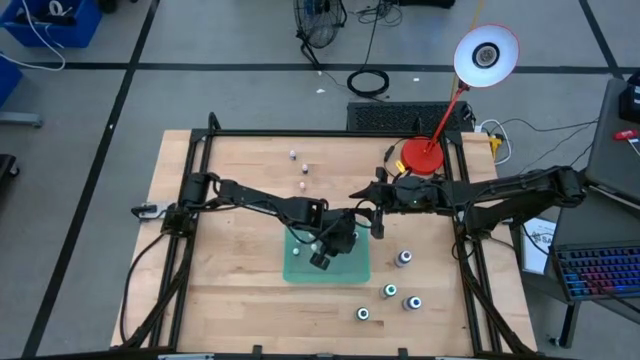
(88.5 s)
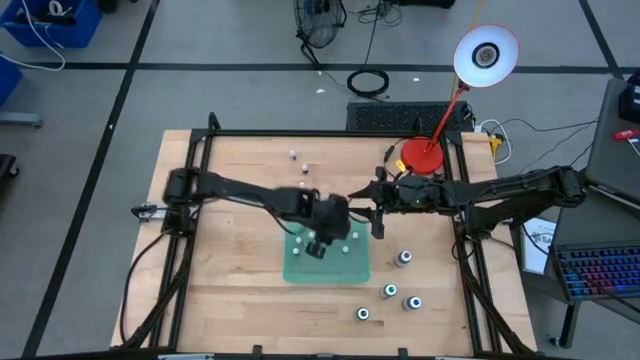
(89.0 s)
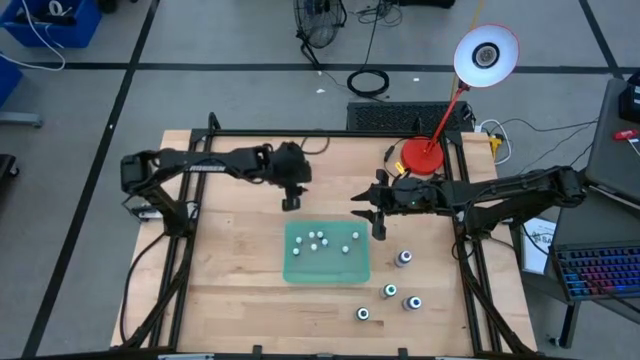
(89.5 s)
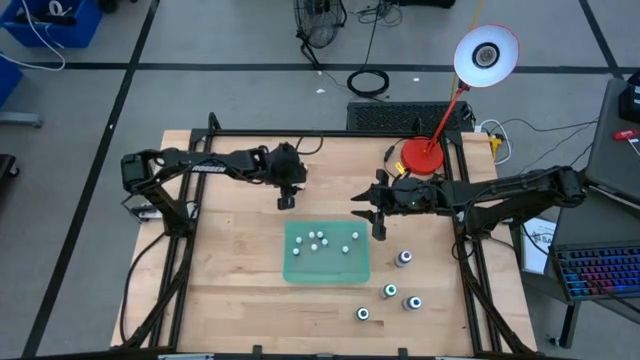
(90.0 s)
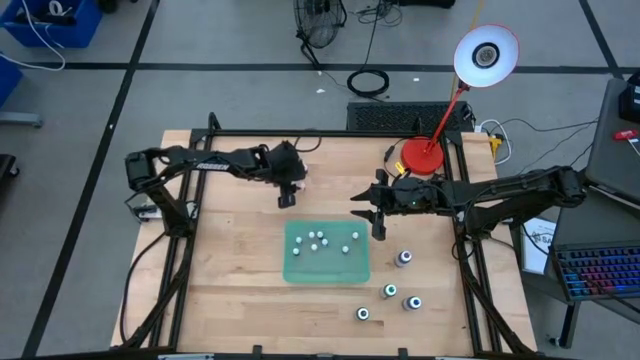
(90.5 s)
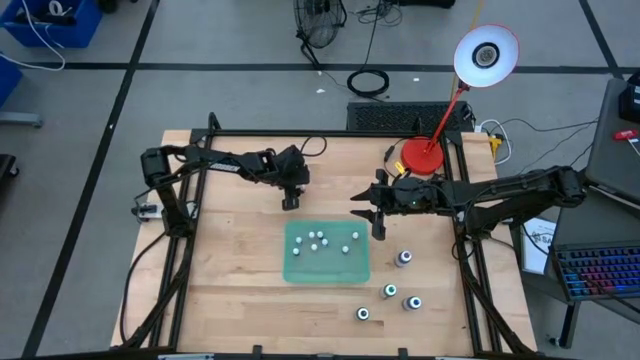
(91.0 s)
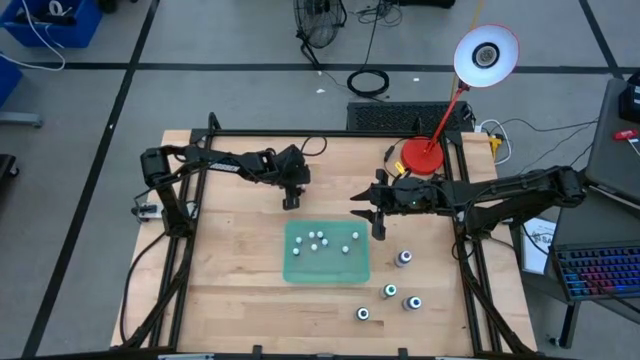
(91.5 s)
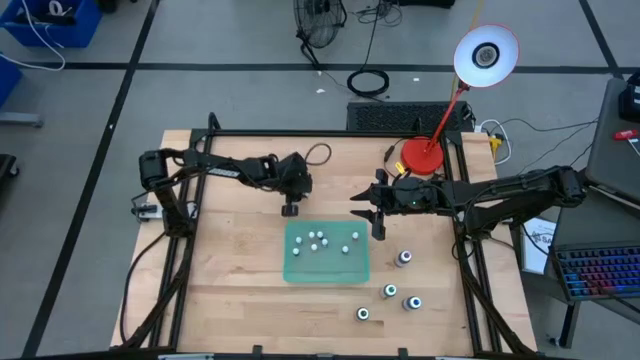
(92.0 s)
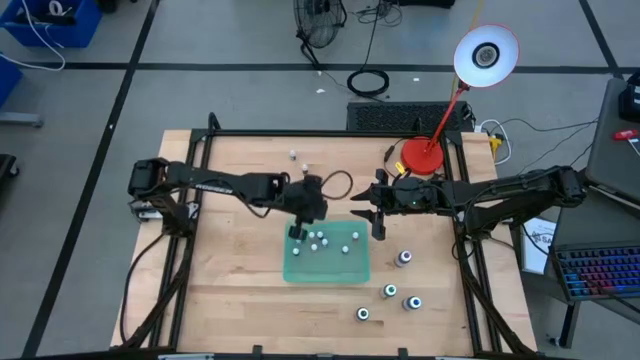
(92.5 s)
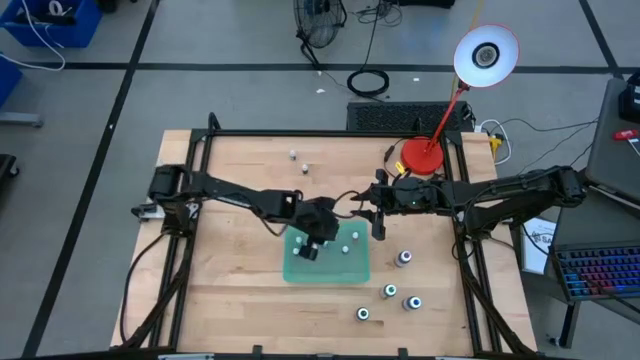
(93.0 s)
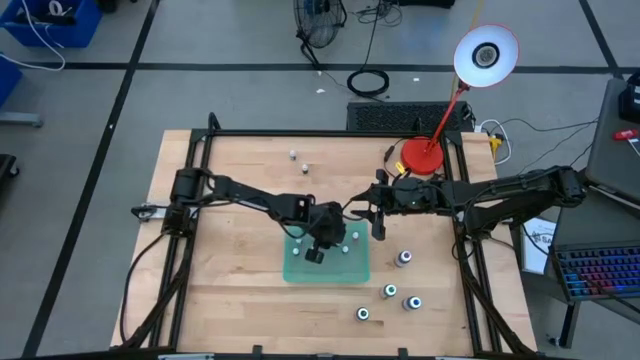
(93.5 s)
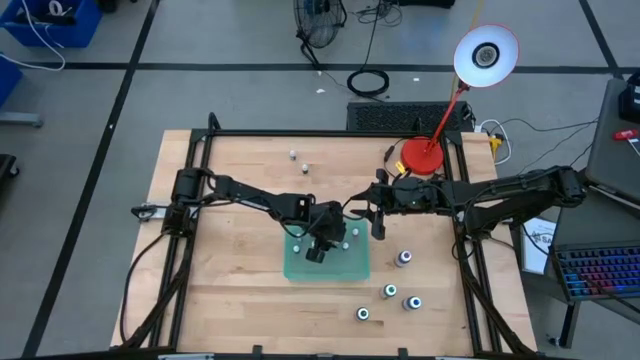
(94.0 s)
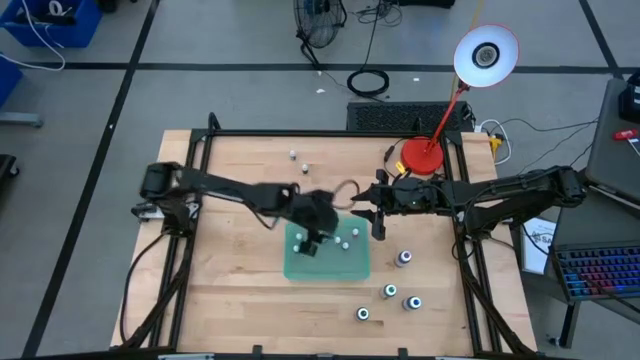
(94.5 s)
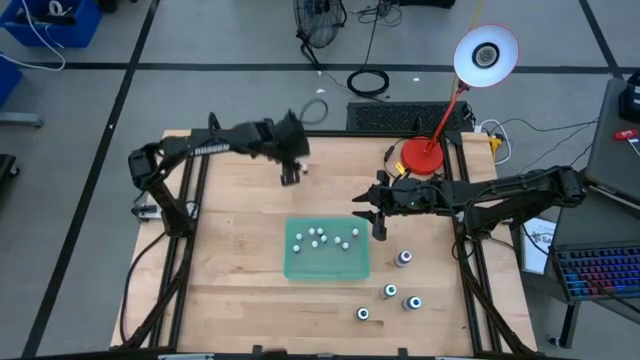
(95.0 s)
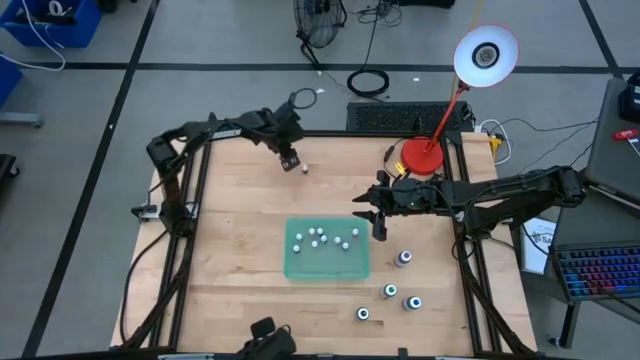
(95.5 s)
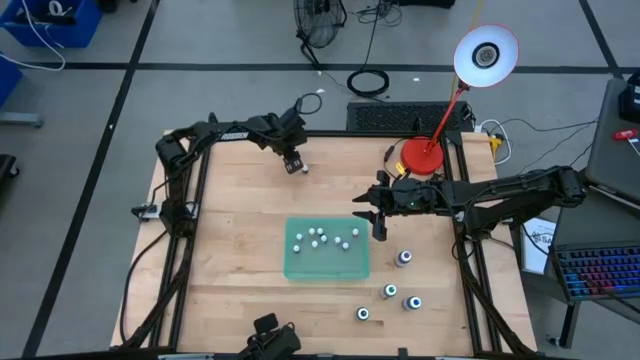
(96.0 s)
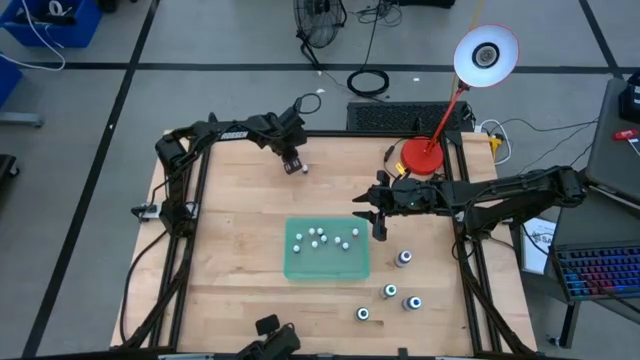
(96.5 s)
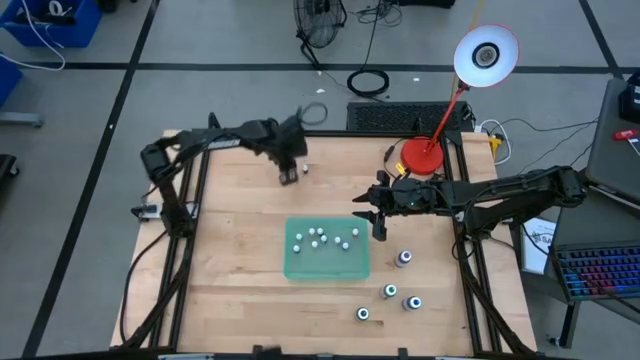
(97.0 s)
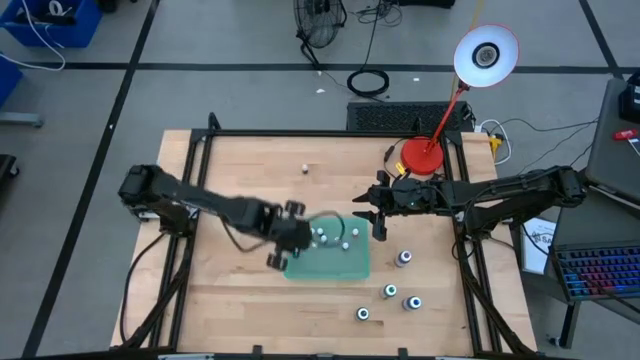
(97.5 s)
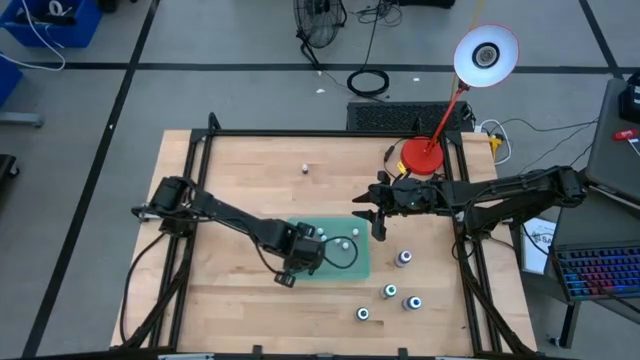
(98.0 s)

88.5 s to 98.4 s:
Task: Pick & Place food coloring
Put the small orange food coloring bottle into the blue bin

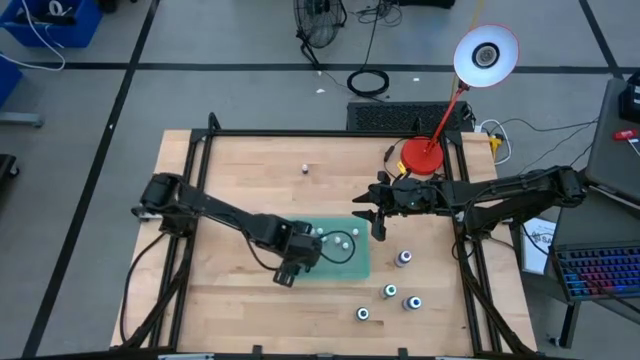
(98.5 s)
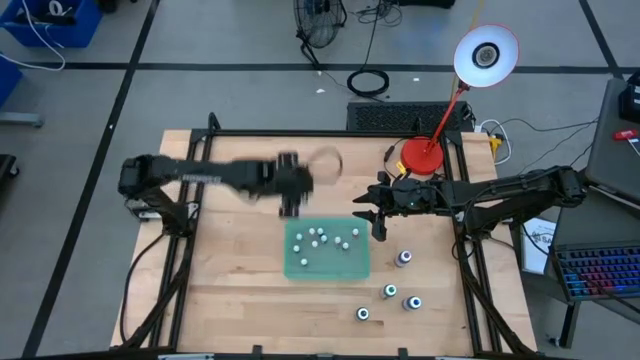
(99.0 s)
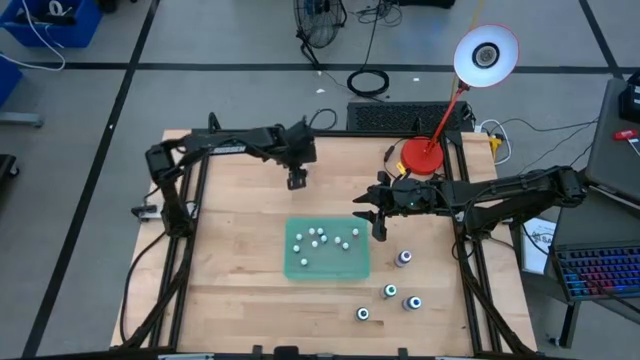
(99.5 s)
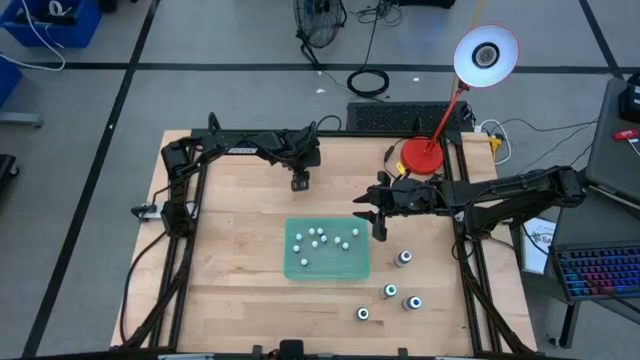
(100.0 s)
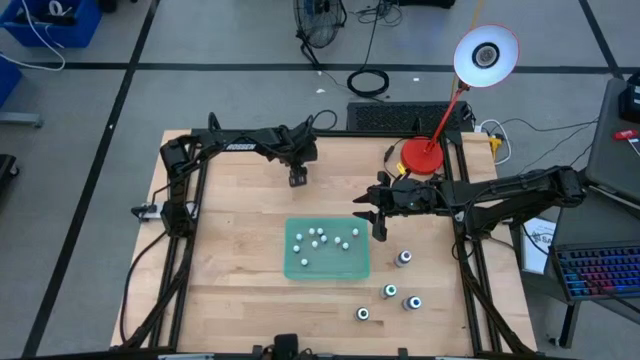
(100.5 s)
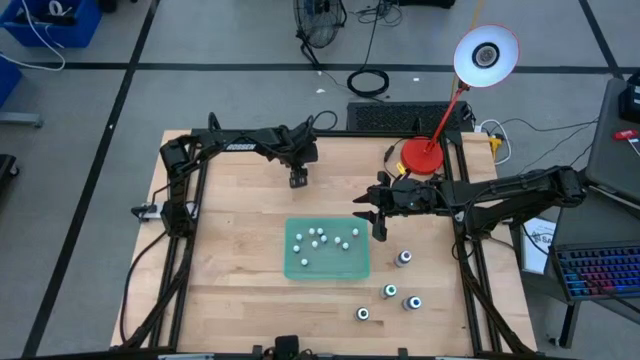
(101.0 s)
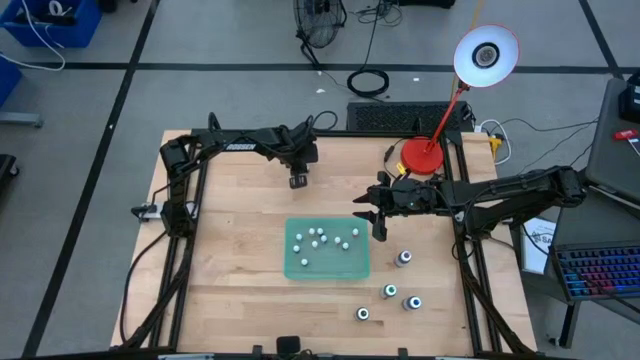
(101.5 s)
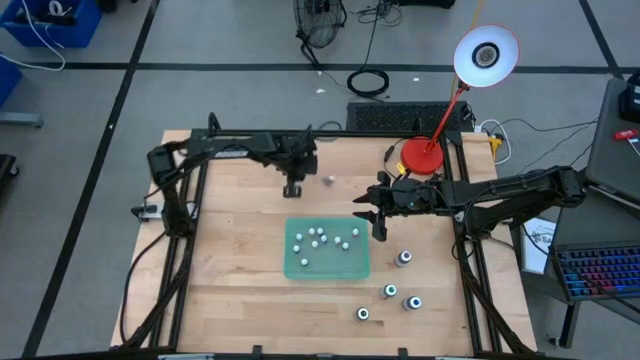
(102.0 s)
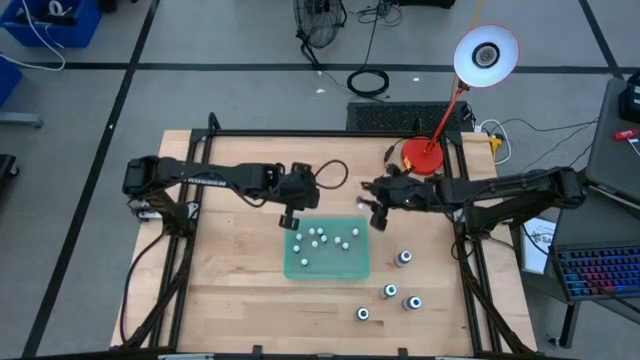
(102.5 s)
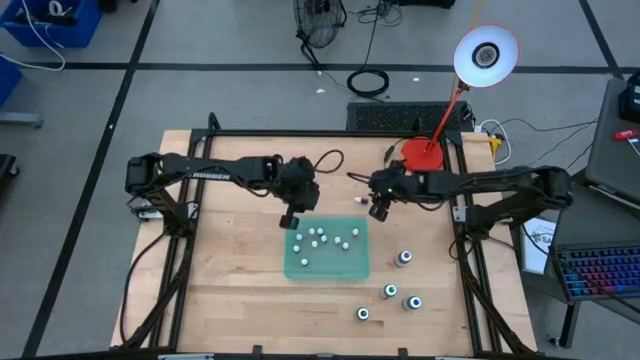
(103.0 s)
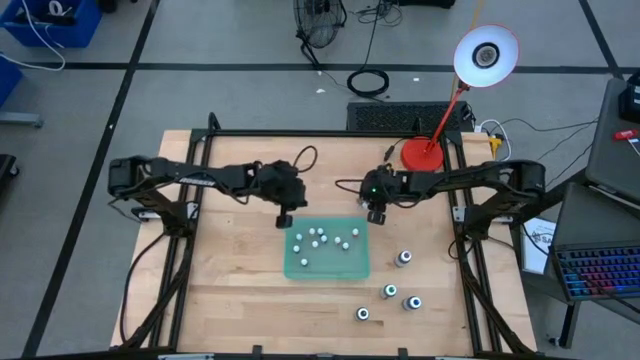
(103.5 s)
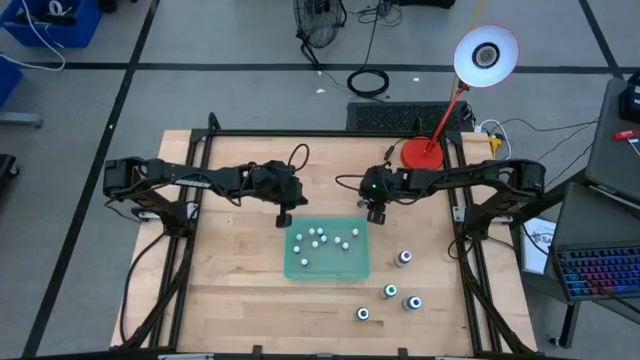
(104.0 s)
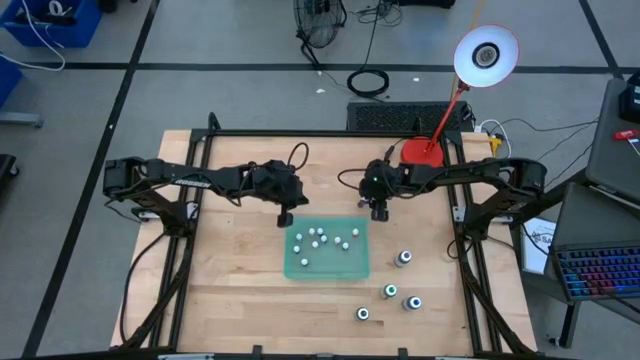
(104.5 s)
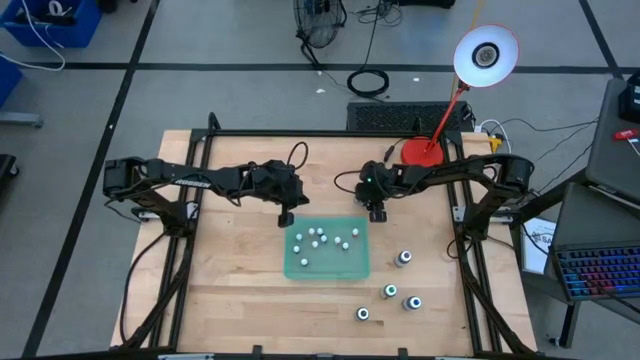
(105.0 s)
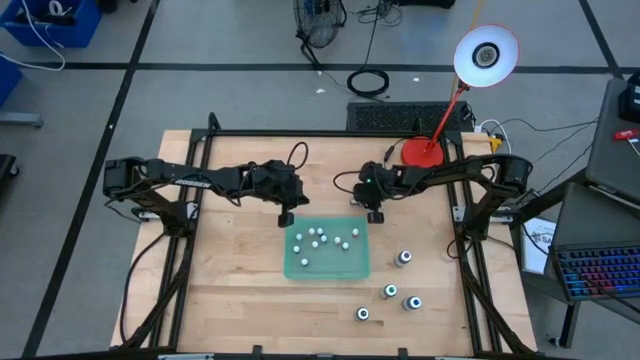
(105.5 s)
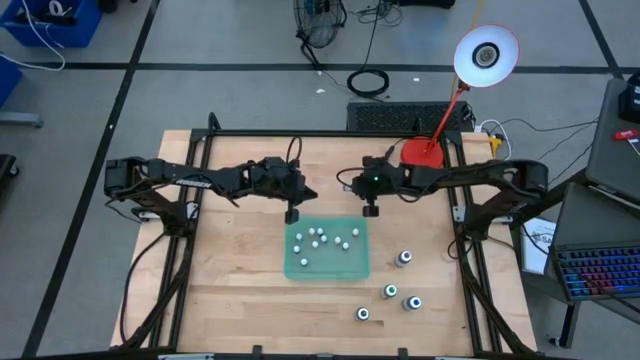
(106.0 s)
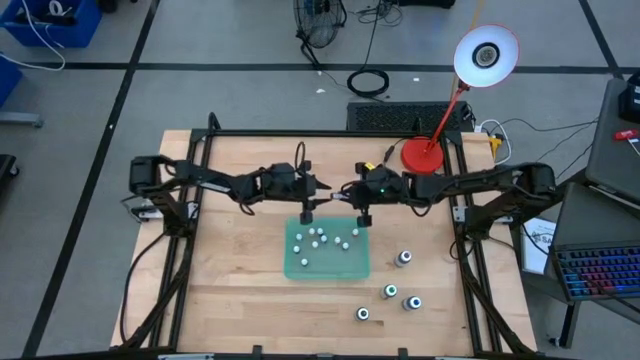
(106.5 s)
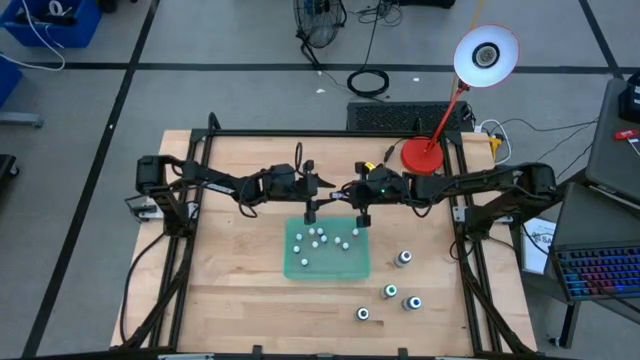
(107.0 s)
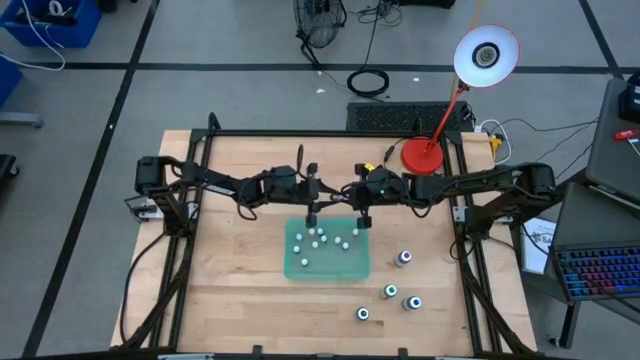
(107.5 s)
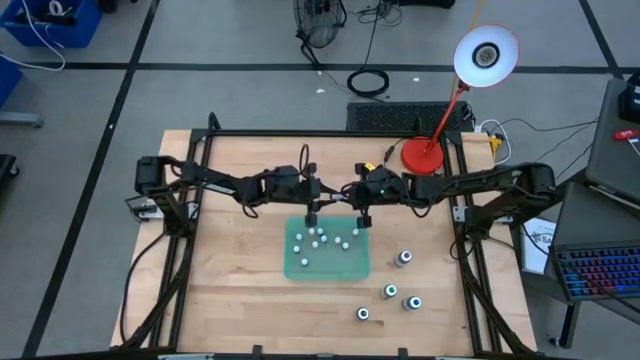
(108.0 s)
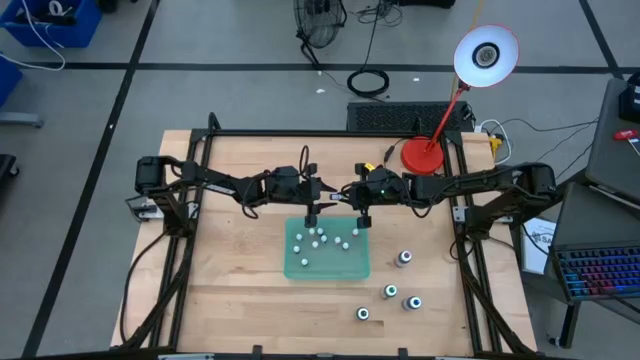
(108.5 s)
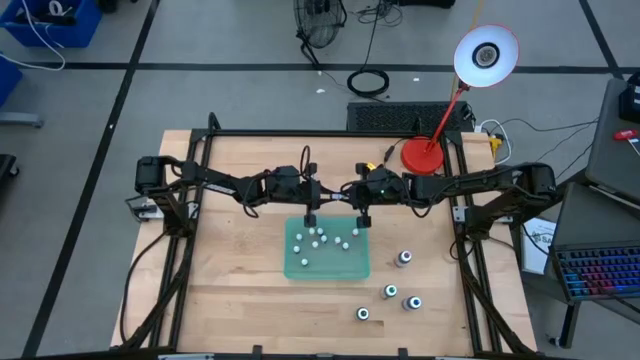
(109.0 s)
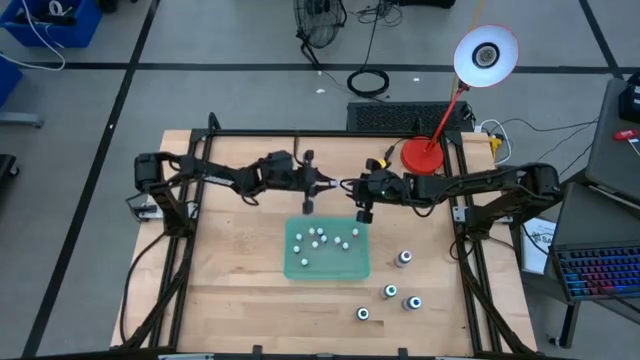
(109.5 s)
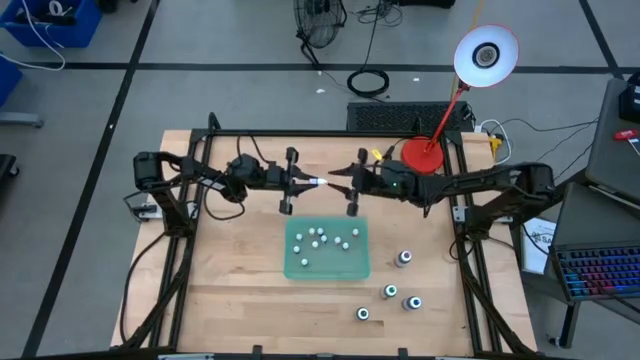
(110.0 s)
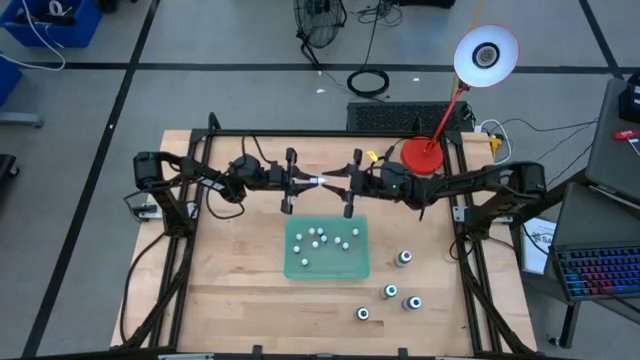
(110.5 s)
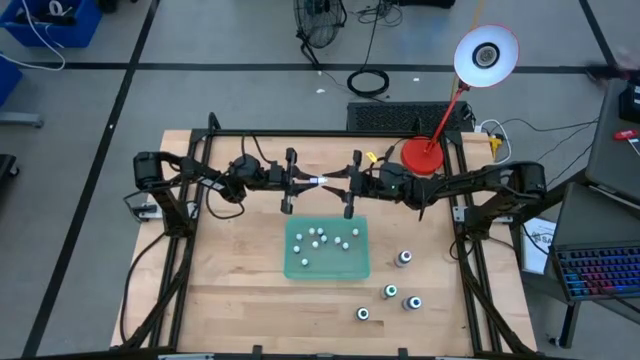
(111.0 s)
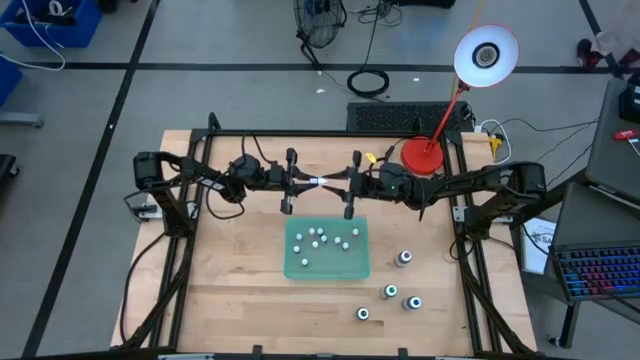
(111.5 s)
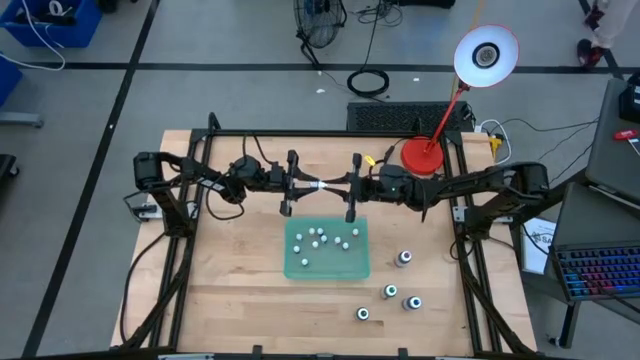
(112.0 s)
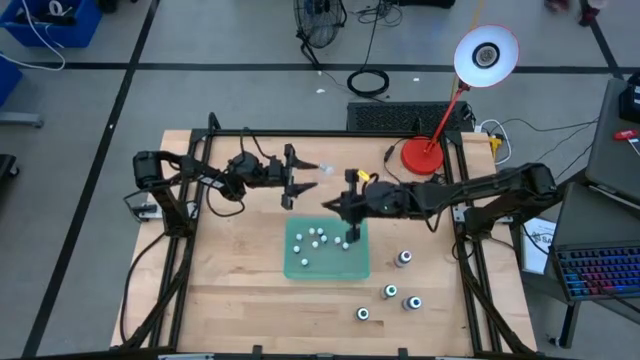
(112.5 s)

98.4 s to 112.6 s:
Put the small purple food coloring bottle into the blue bin
